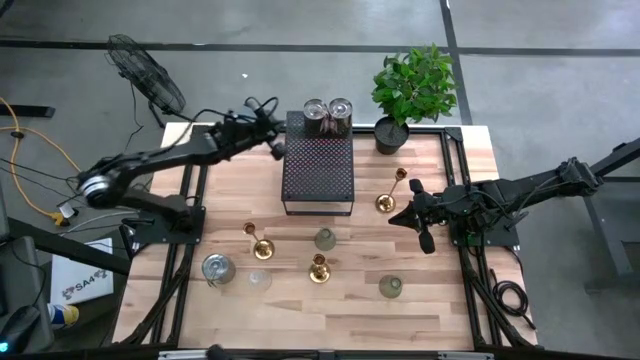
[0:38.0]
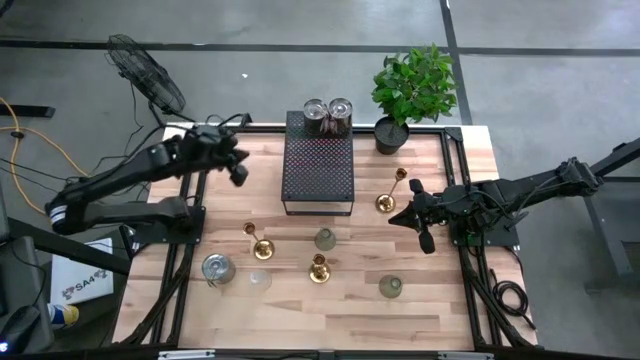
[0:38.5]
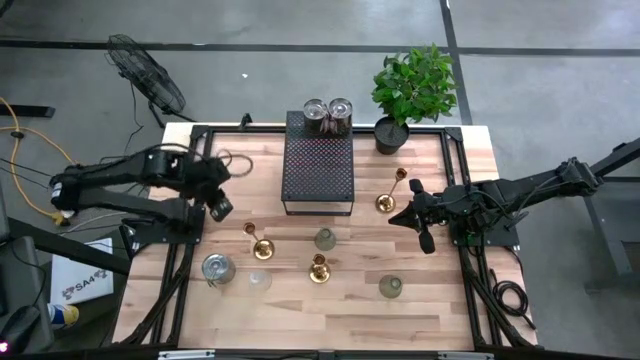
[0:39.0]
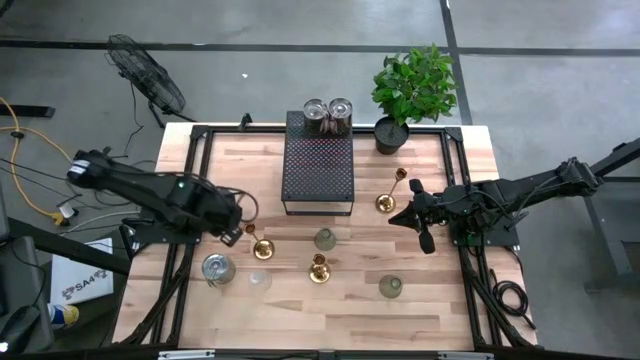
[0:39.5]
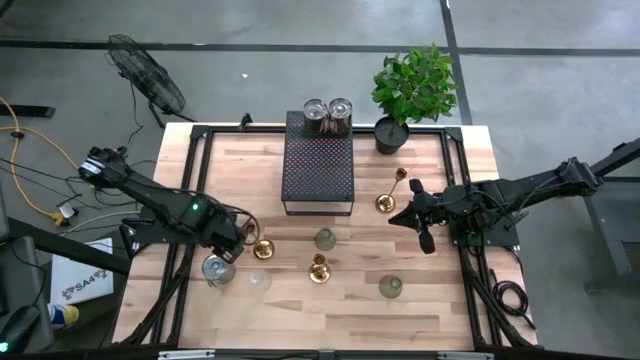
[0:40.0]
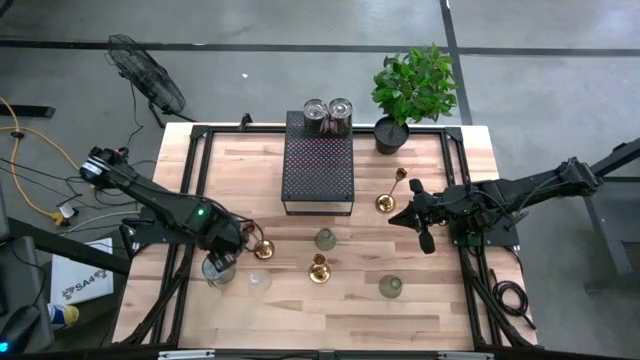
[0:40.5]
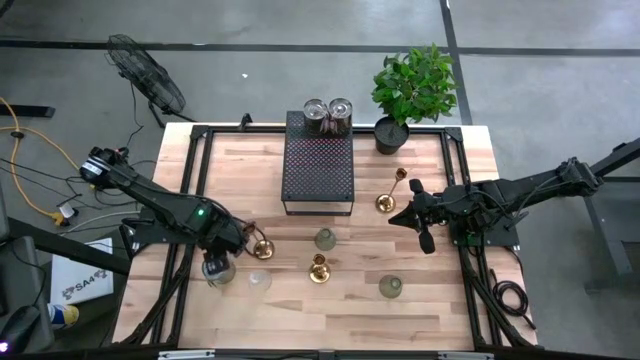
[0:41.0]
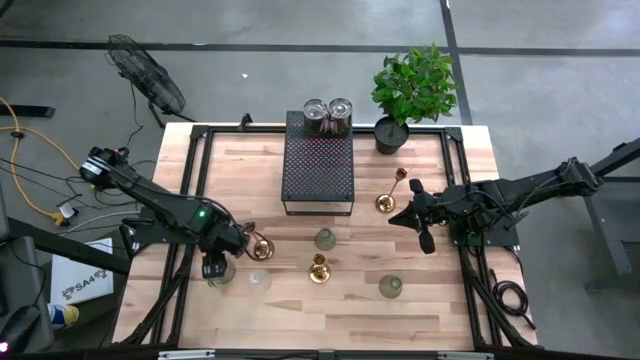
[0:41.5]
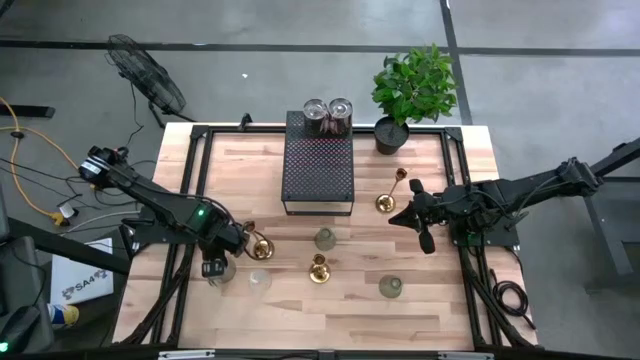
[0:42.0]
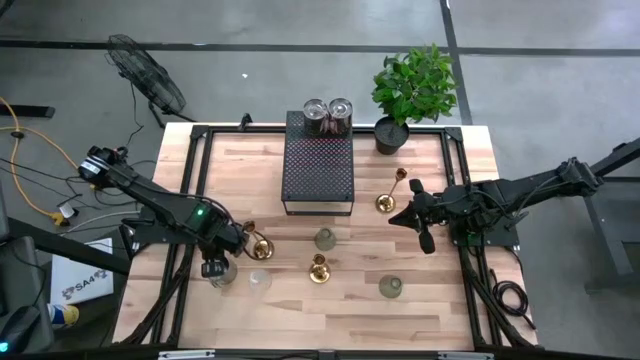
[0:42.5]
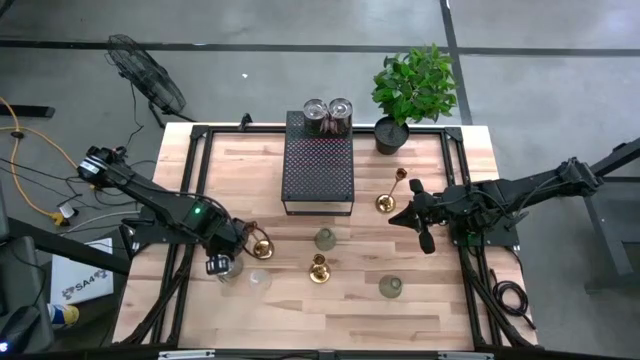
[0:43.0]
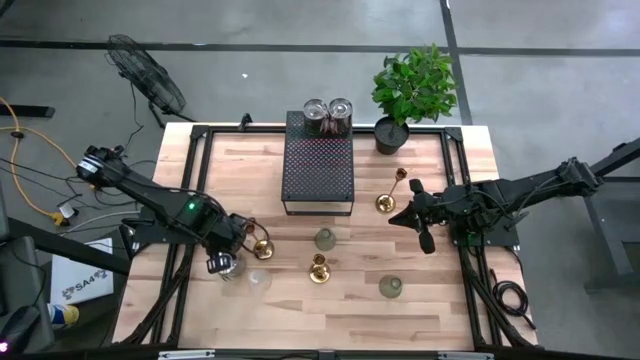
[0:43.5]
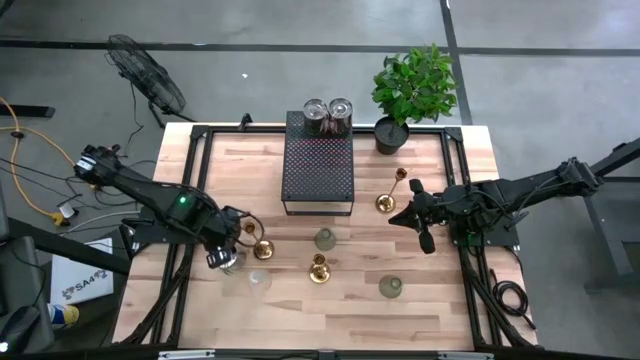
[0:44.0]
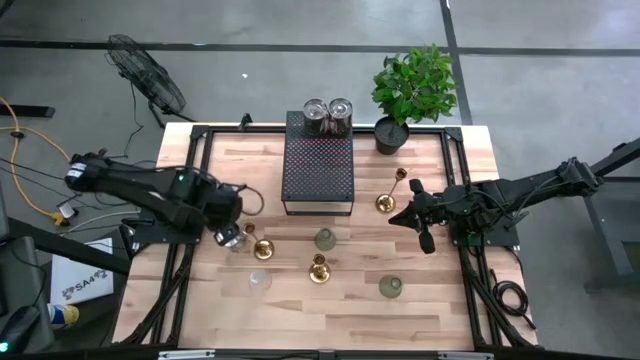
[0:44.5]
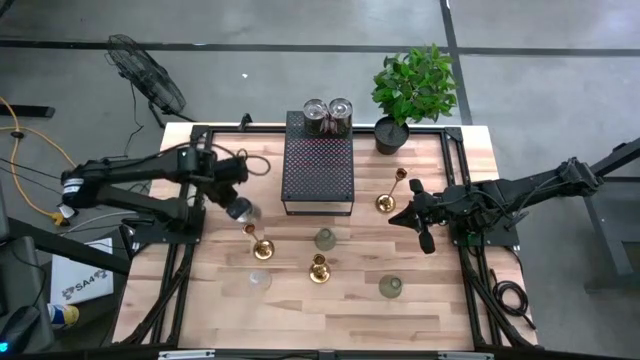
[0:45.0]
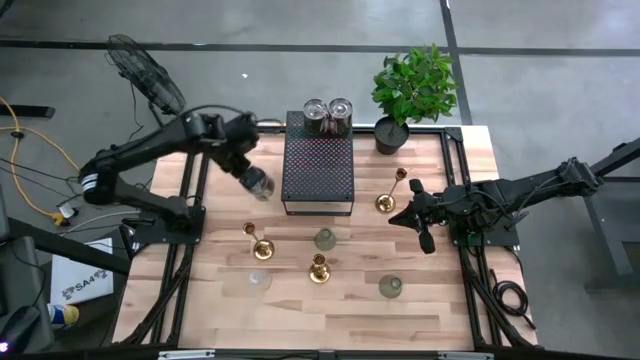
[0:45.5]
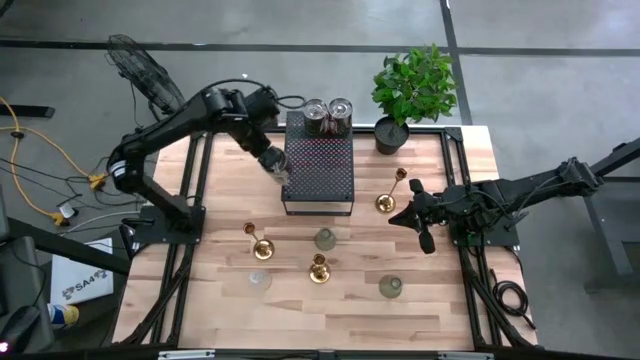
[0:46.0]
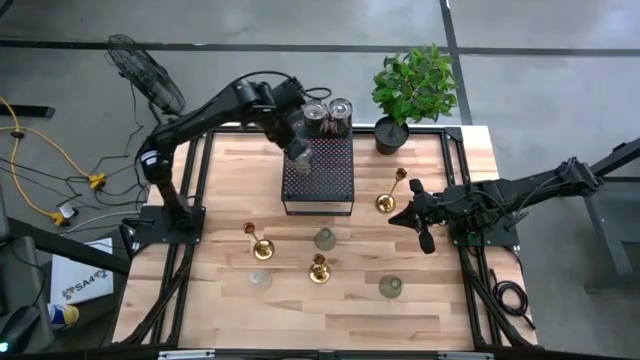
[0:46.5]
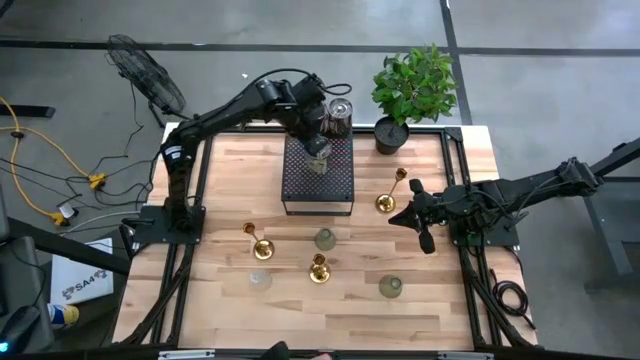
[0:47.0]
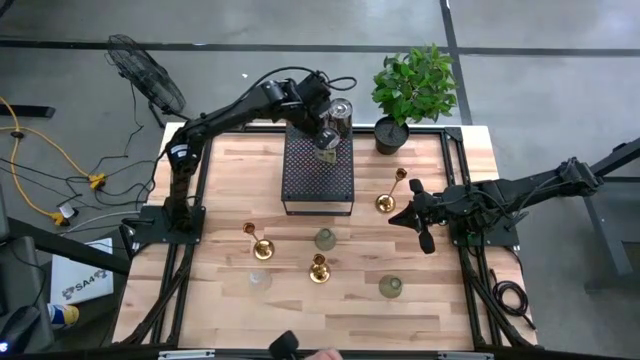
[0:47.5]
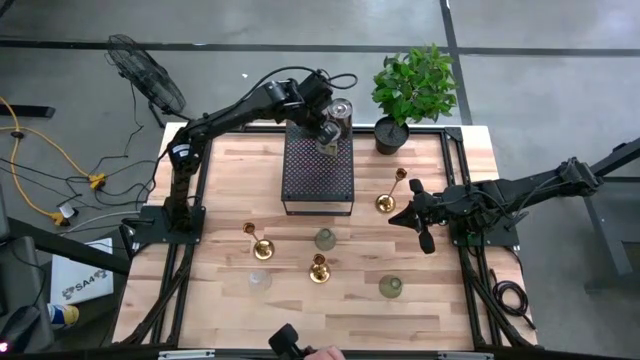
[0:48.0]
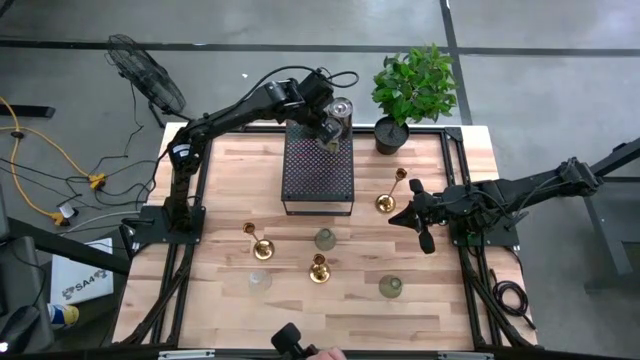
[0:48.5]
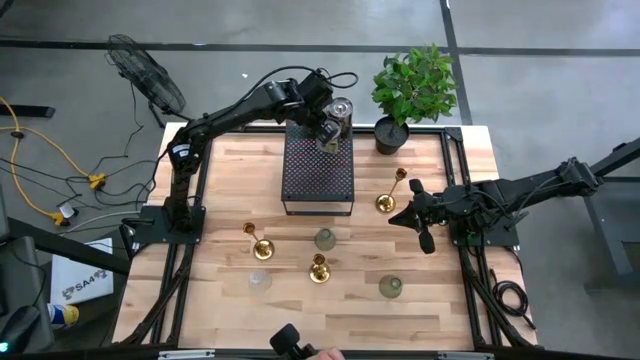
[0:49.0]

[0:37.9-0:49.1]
Task: Pick & Place candle stick holders
Put the silver scented candle on the shelf

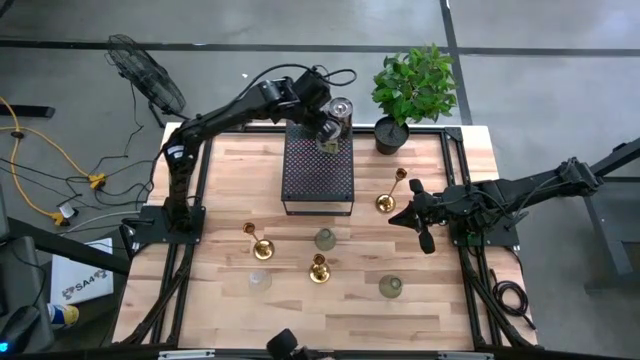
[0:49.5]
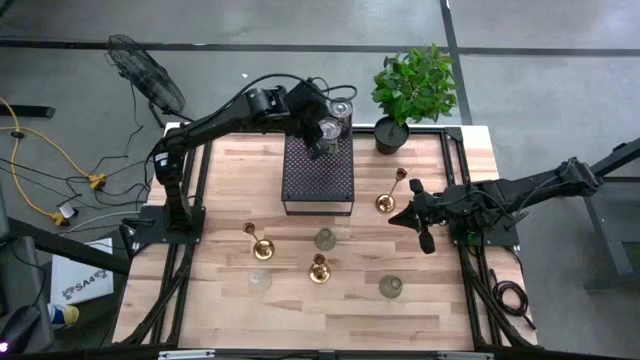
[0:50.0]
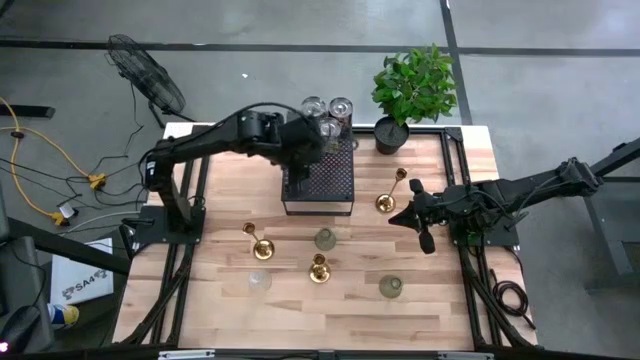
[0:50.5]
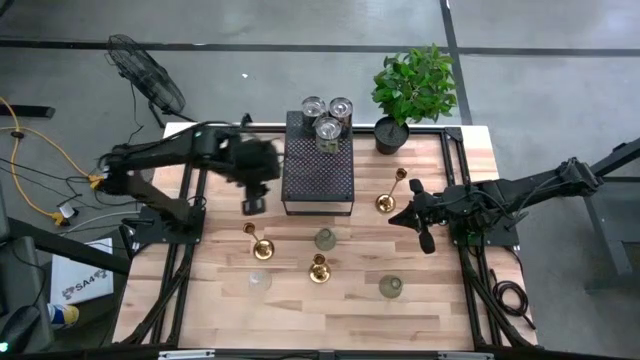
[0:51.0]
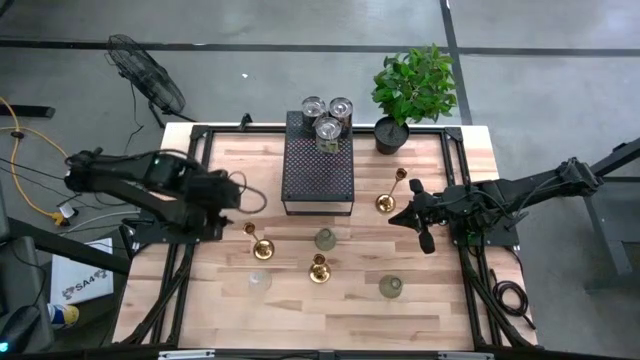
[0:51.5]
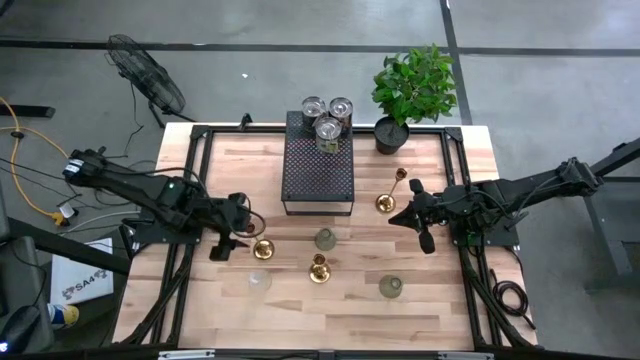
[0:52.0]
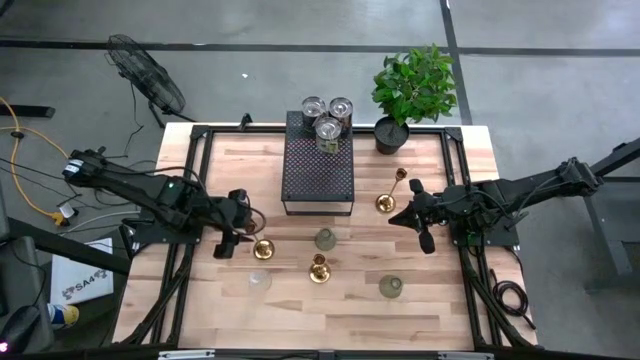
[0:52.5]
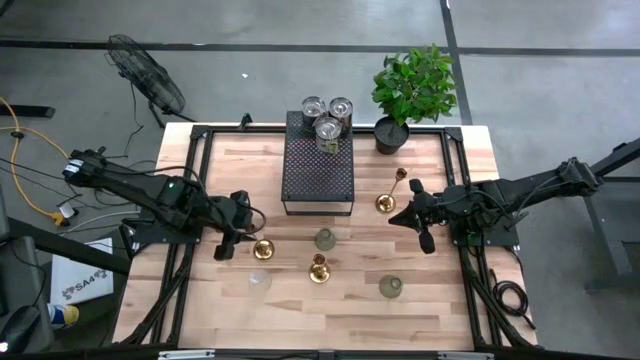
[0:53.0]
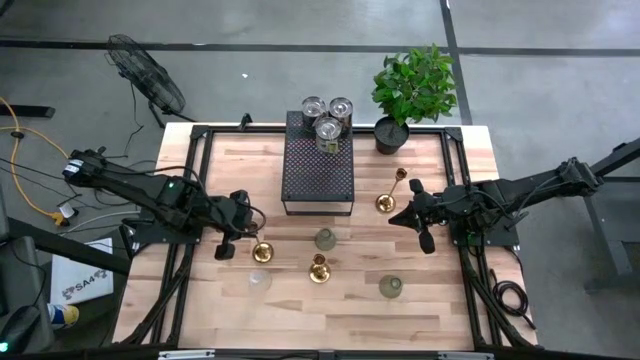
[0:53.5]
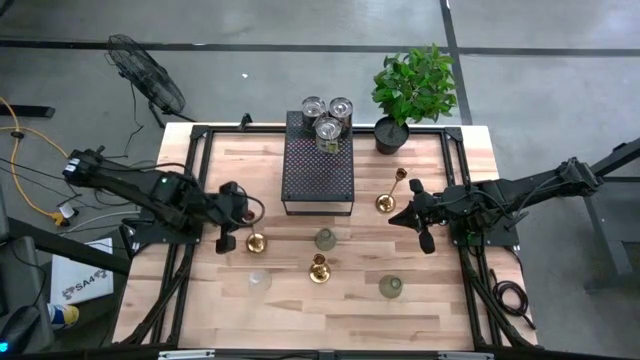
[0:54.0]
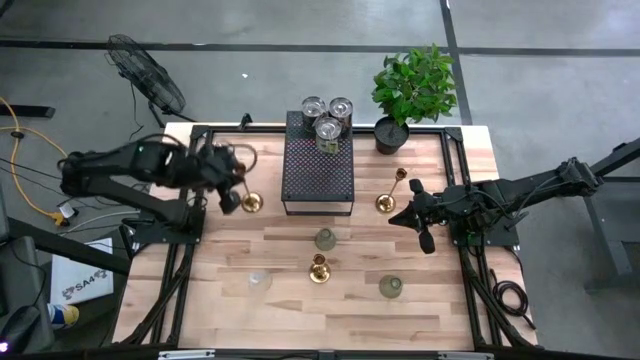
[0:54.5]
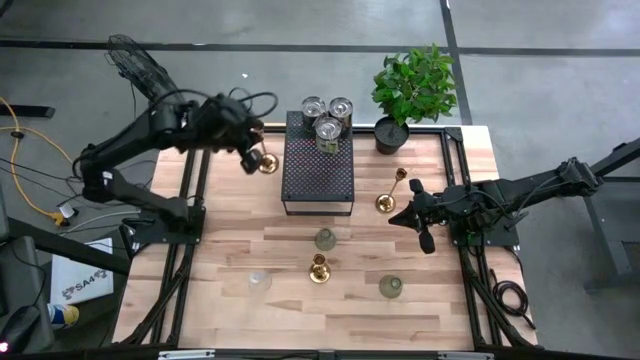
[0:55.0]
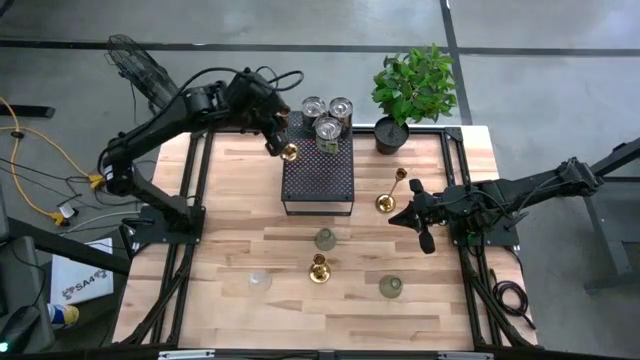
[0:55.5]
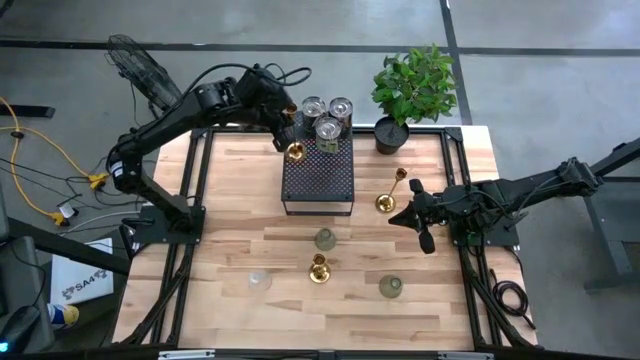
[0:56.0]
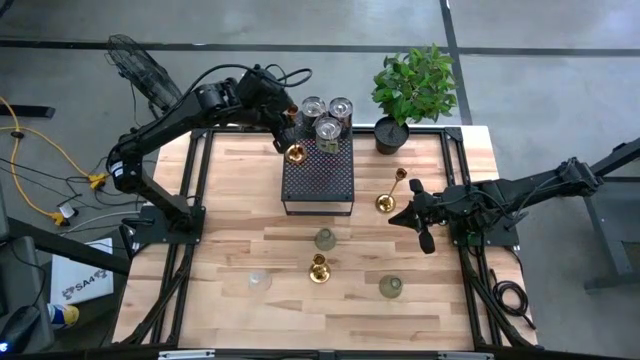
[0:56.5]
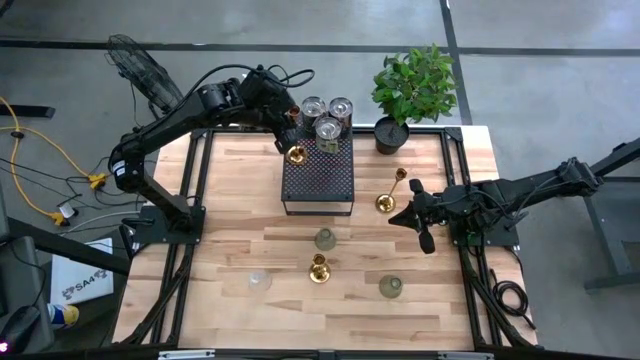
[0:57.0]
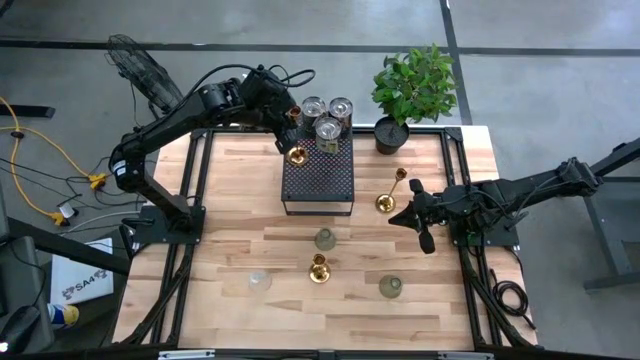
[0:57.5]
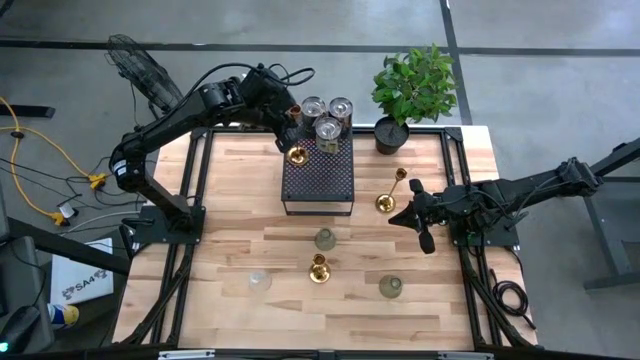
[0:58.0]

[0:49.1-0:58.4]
Put the middle-left gold candle holder on the shelf

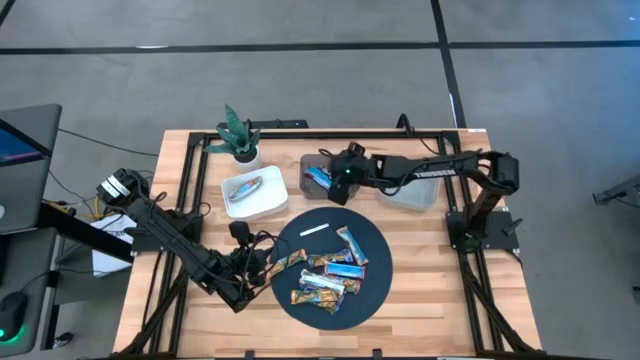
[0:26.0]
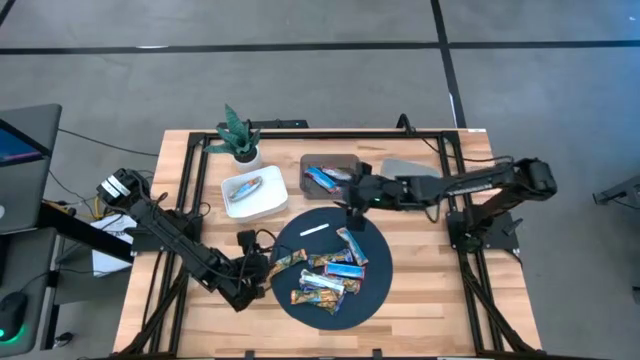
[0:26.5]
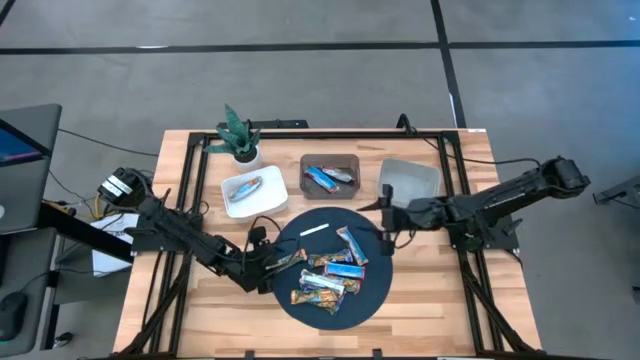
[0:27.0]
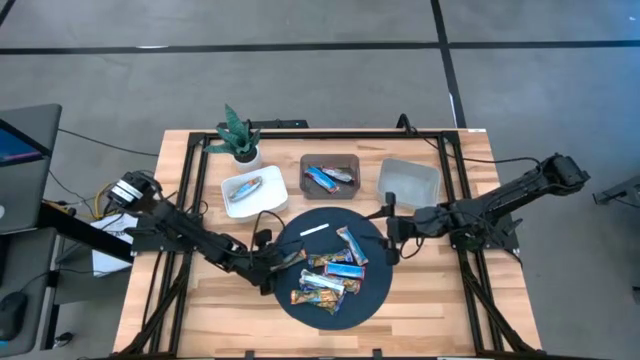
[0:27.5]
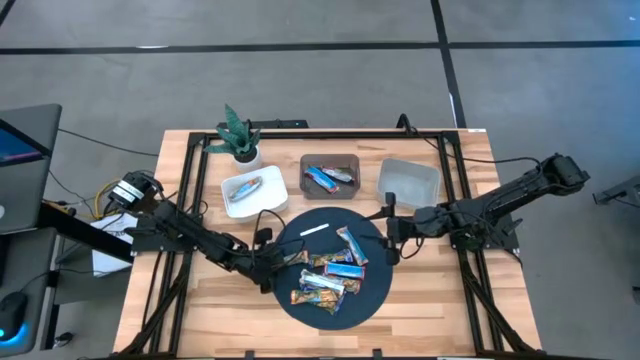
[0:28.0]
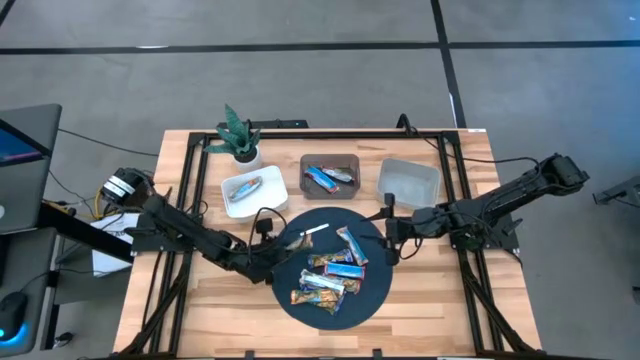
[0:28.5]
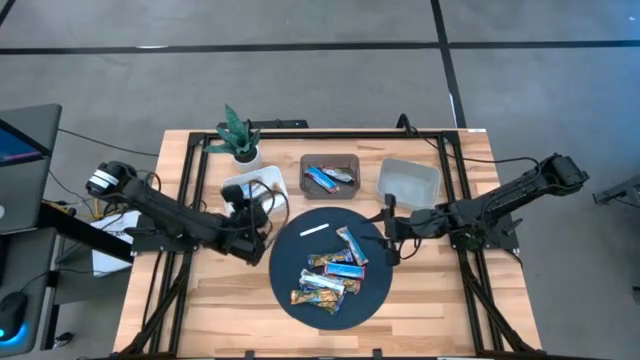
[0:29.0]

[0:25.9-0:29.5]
Task: Pick and place Granola Bars by type
Put the orange granola bar into the white bin
